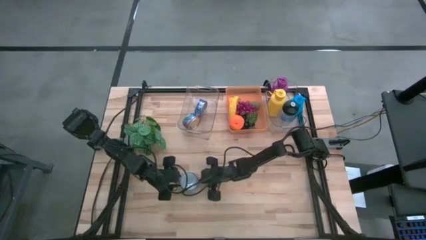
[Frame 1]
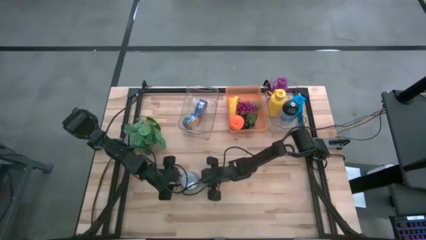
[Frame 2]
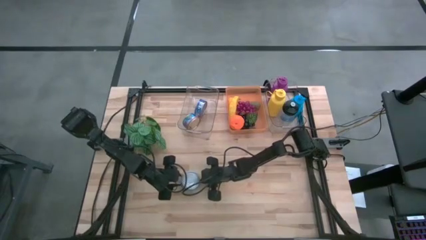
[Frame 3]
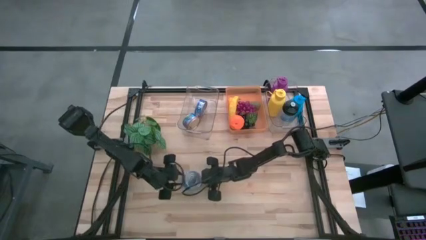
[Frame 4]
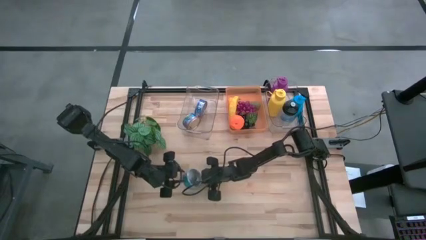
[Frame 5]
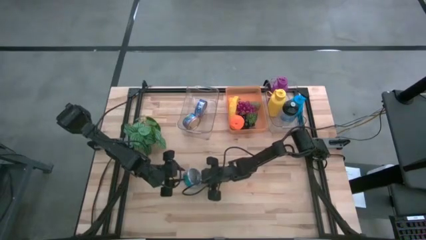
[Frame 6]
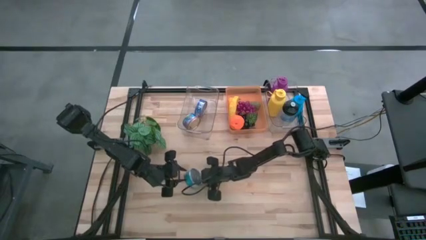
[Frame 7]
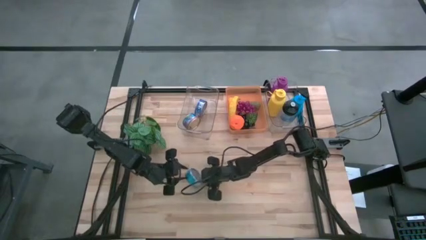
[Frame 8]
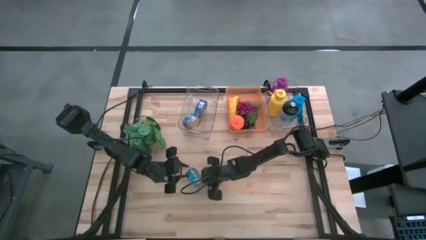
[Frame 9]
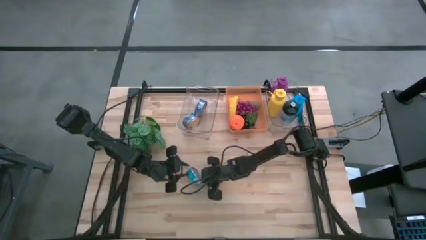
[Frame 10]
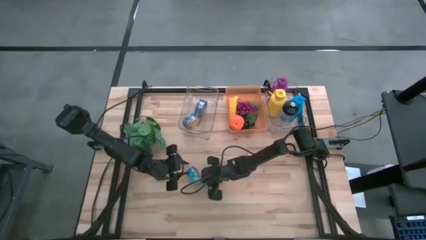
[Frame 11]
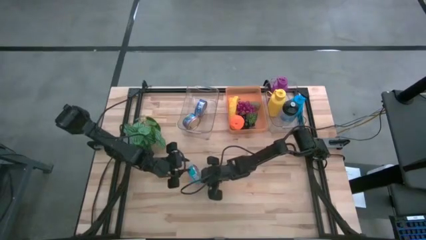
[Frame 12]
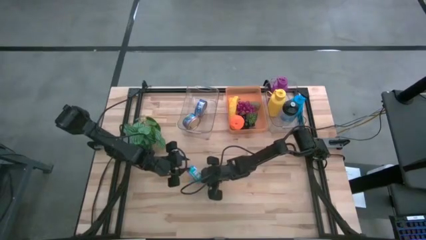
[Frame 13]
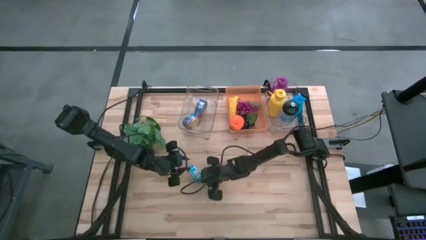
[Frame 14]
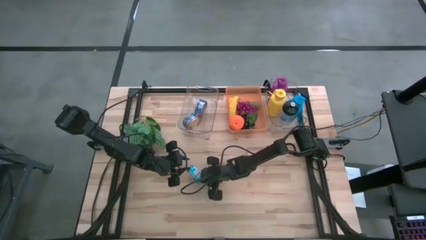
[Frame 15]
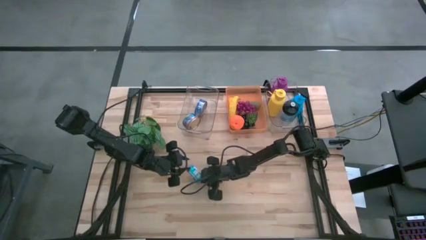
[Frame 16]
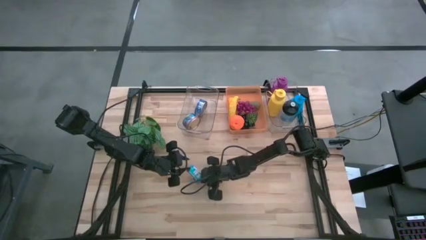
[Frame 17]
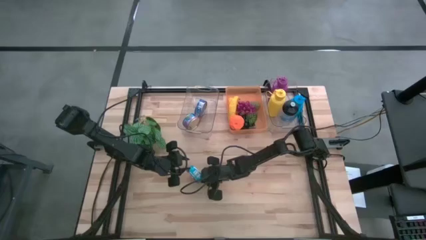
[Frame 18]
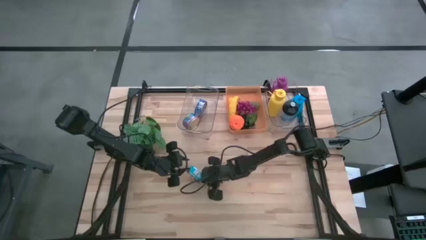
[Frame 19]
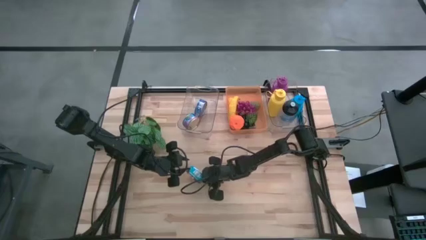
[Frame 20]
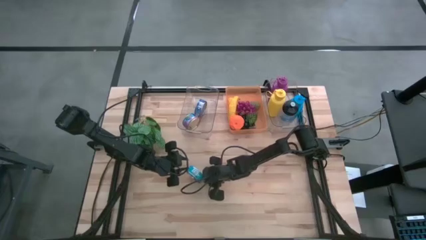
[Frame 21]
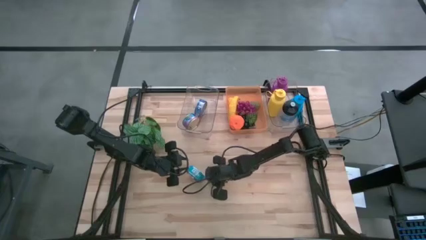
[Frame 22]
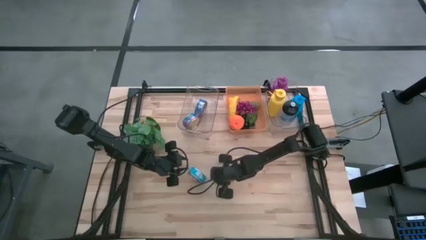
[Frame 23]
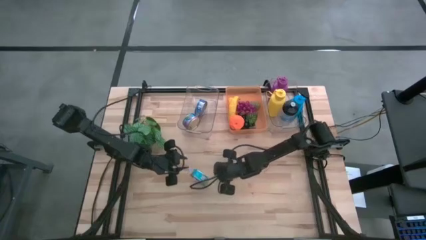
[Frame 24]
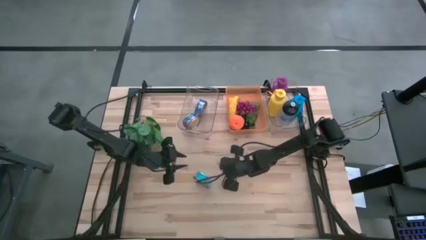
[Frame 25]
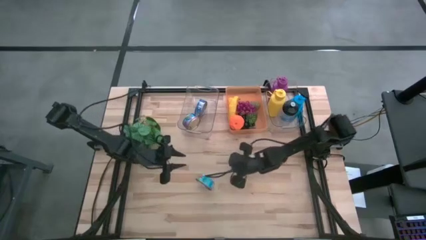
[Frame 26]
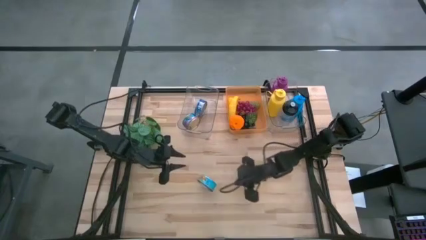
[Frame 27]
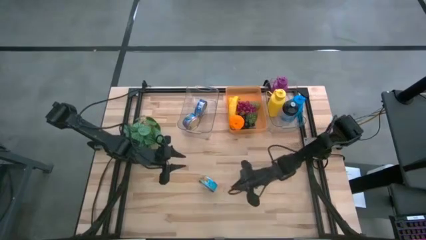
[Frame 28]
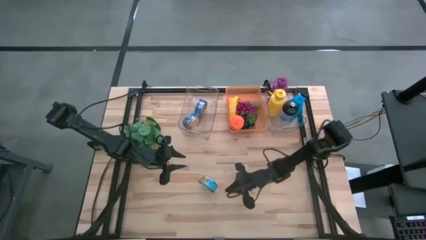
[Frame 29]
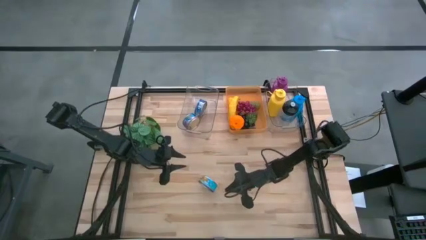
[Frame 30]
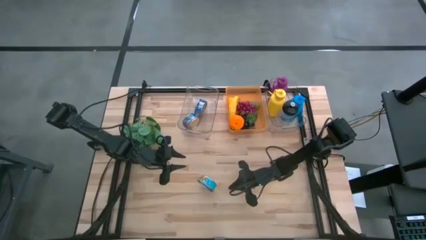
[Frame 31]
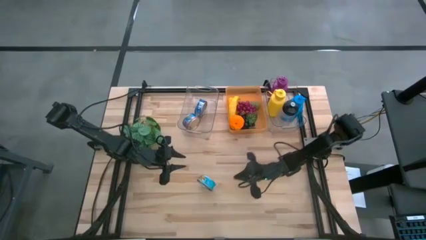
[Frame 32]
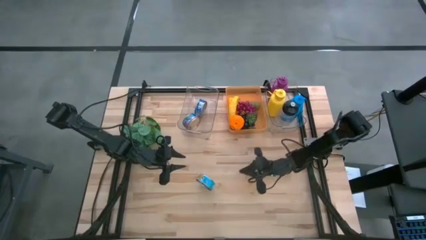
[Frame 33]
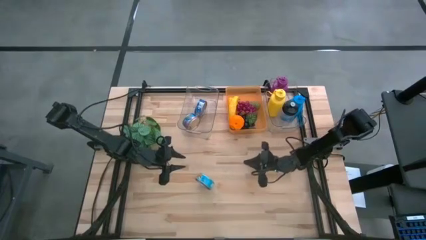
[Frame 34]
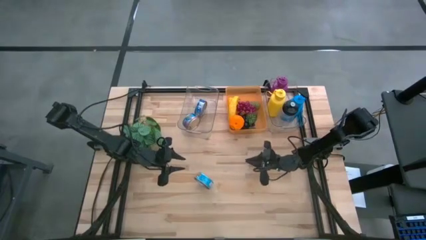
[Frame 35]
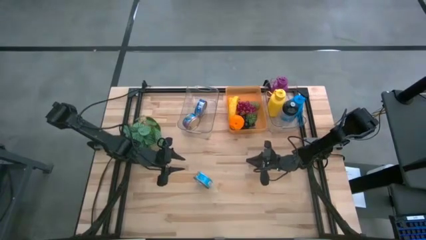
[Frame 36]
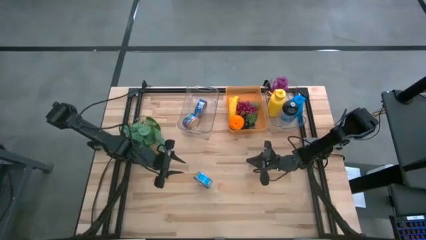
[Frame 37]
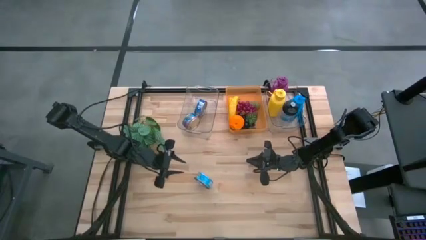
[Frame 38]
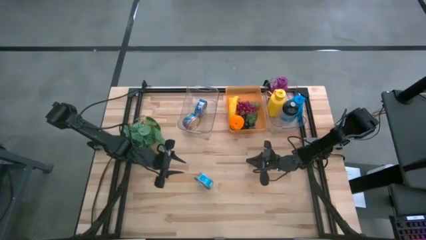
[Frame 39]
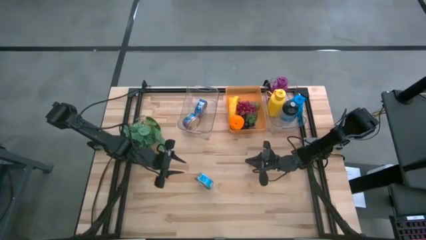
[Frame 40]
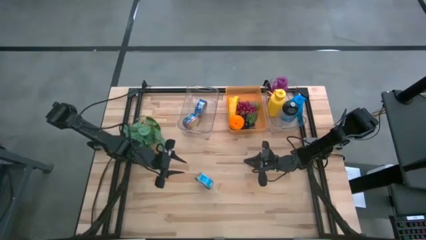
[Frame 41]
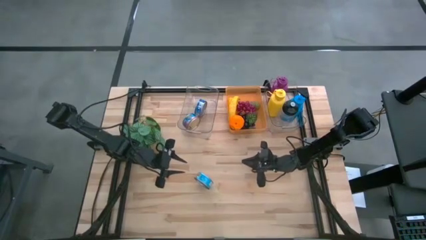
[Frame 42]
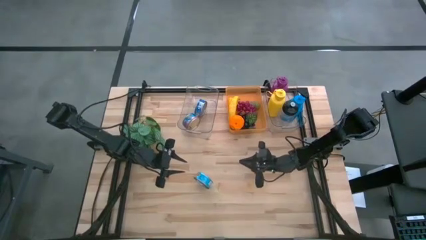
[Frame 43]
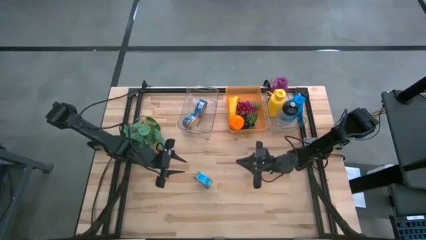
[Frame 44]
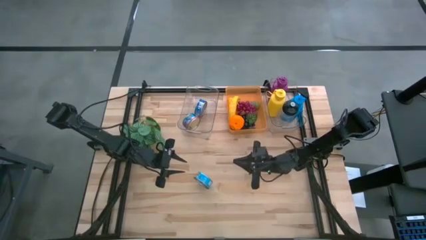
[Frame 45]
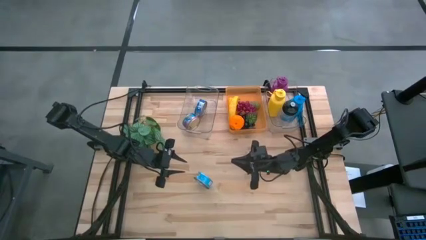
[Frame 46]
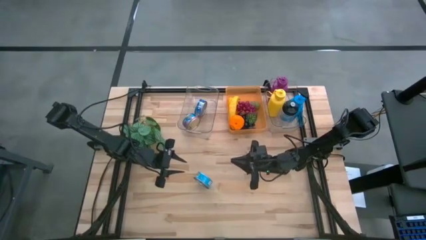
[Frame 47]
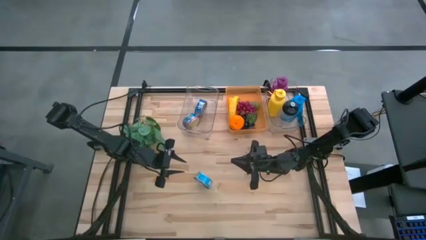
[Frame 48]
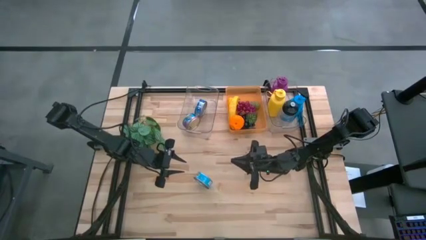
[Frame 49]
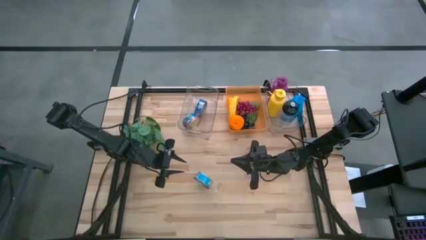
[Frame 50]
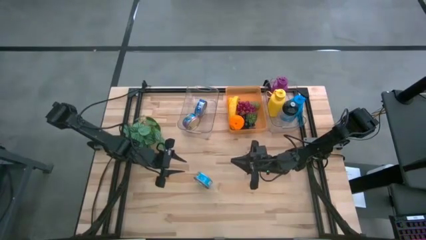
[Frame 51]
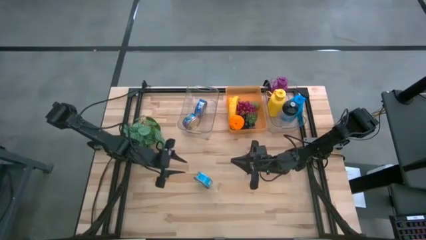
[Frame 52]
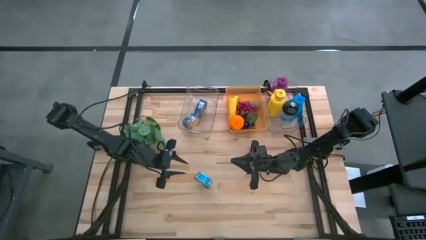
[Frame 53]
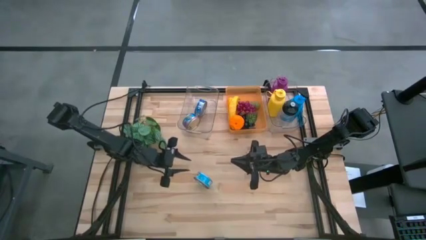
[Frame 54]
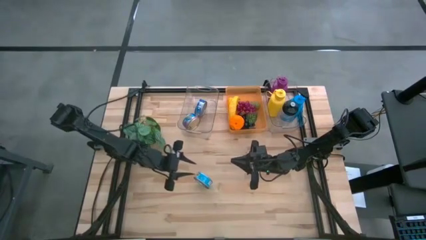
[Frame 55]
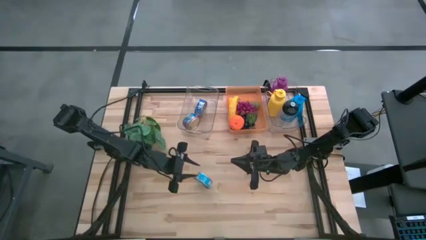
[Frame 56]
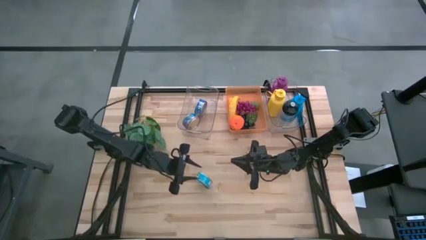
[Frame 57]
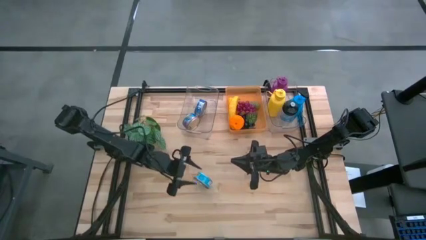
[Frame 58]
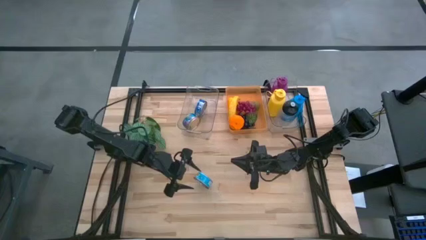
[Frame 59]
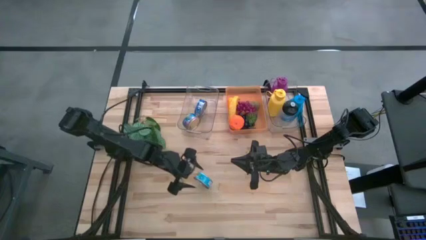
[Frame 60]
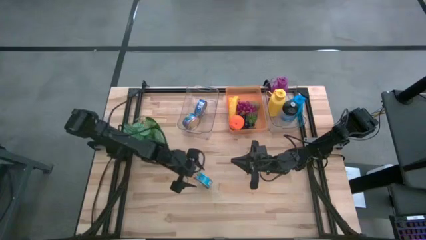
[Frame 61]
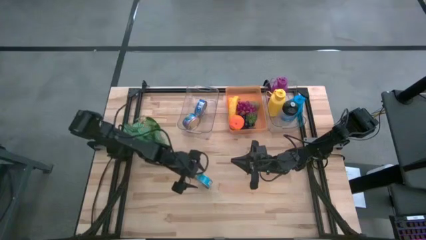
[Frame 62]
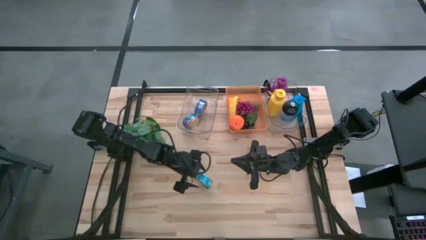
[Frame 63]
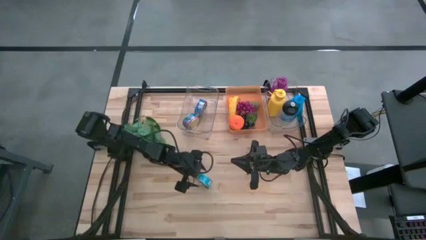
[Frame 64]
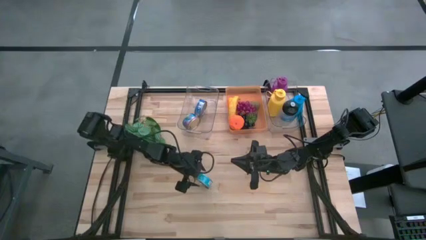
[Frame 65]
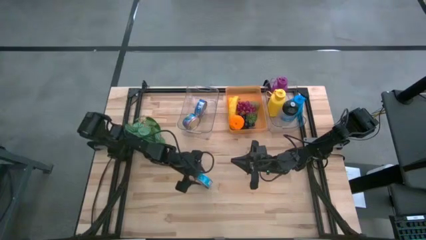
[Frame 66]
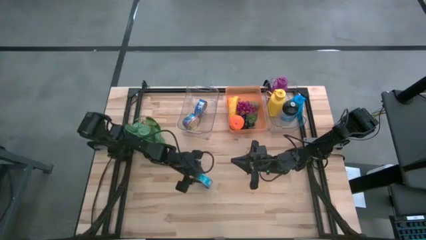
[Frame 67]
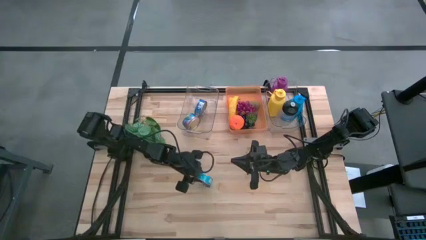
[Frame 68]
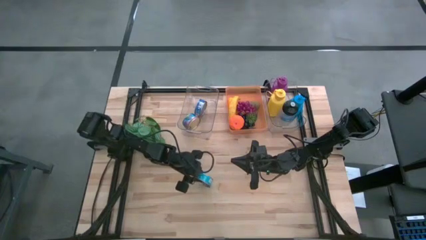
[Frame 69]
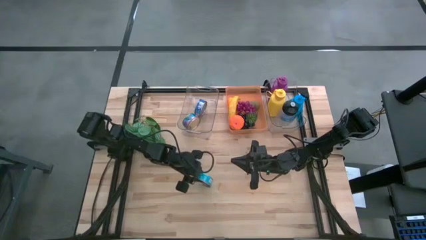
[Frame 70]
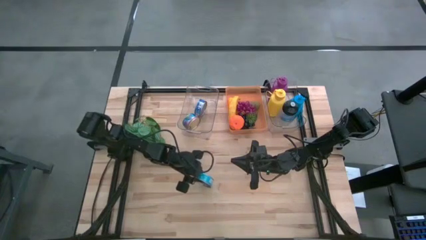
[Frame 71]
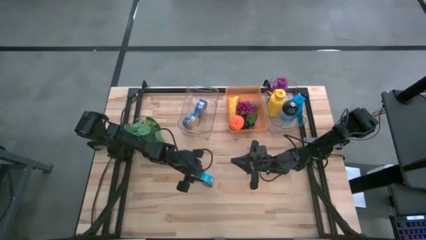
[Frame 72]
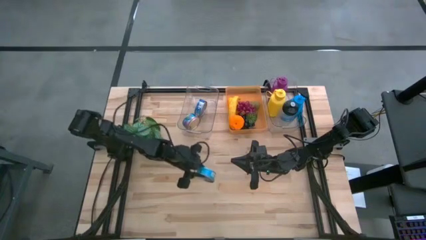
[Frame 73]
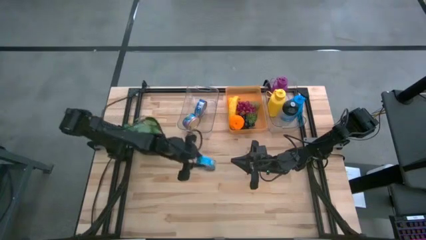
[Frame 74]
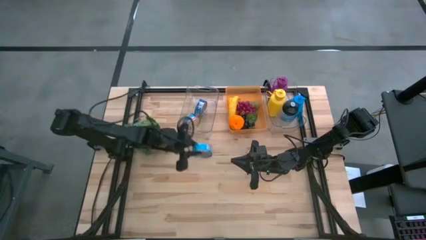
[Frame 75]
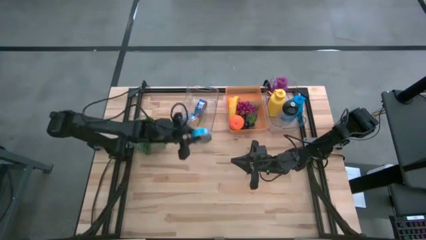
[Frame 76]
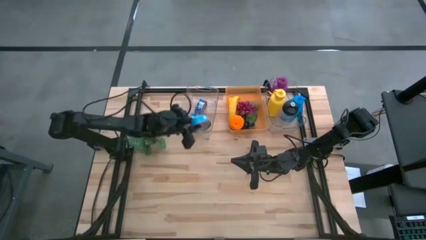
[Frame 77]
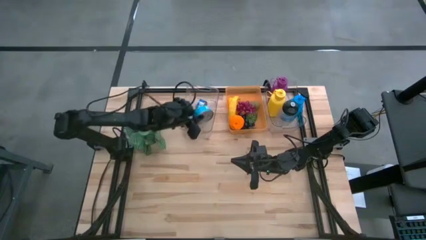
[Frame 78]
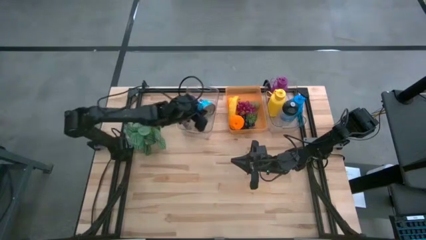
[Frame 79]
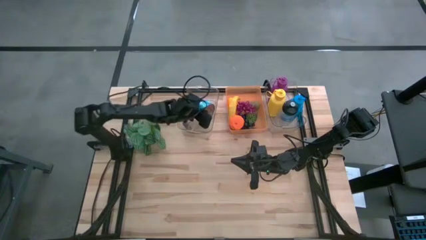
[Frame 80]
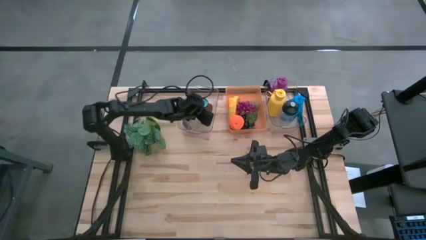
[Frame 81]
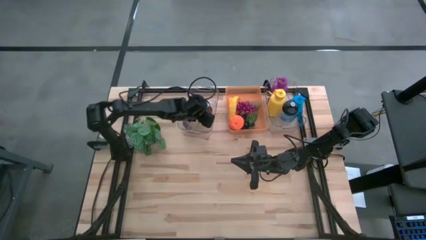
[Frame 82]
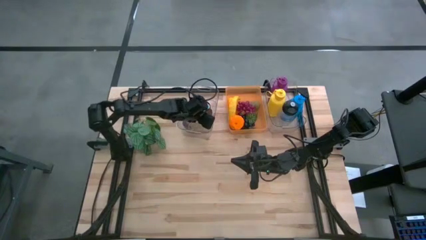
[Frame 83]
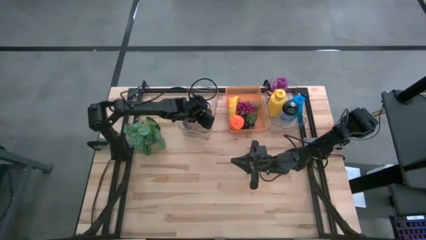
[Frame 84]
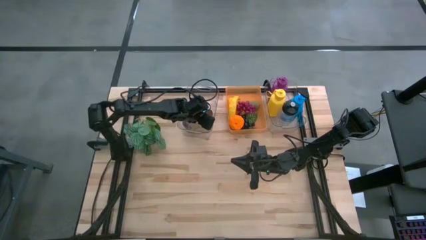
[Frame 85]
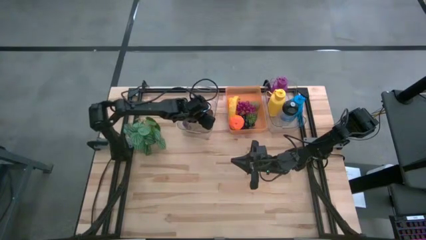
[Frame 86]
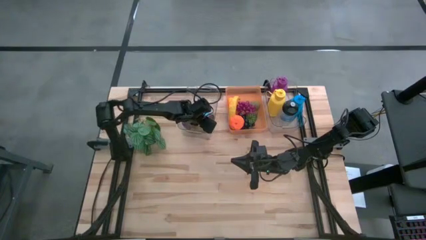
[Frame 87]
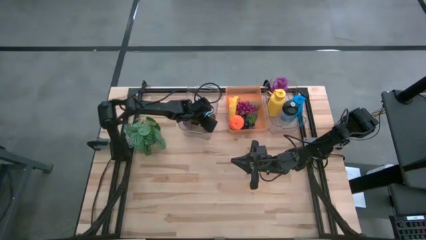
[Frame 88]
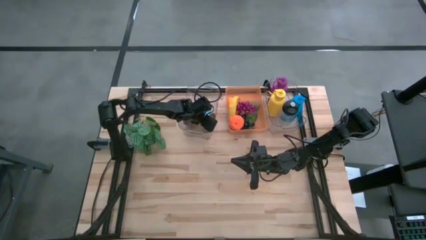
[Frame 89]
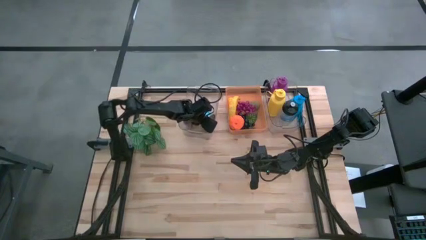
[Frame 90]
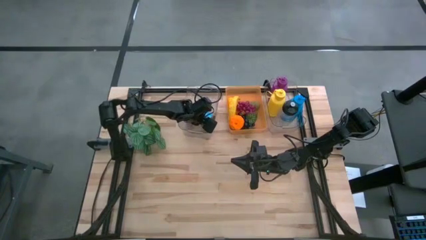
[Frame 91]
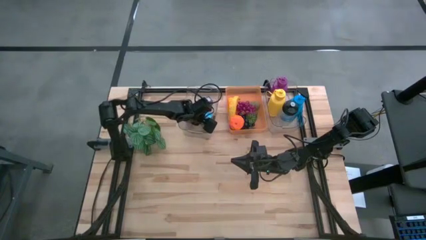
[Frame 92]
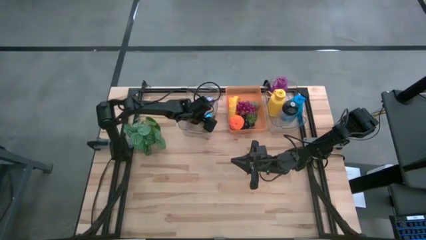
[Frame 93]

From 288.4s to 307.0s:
Task: Pick & Place Food Item
Put the blue and yellow tuna can into the left transparent bin
